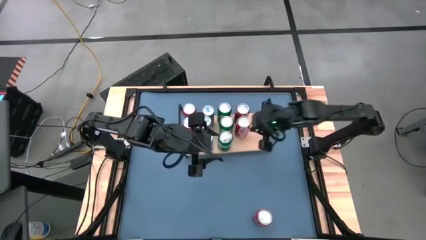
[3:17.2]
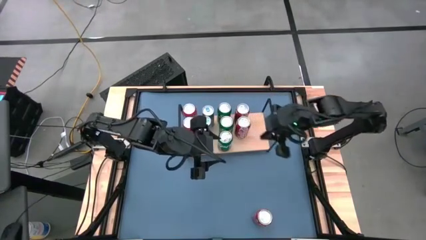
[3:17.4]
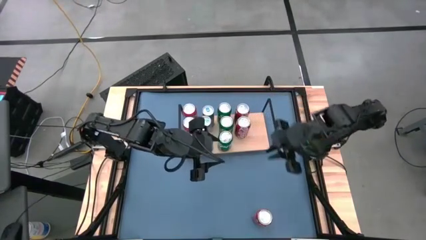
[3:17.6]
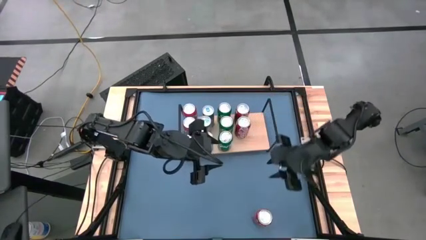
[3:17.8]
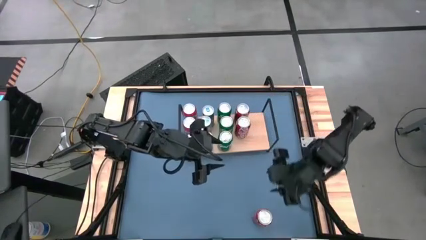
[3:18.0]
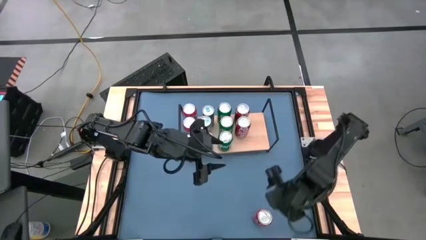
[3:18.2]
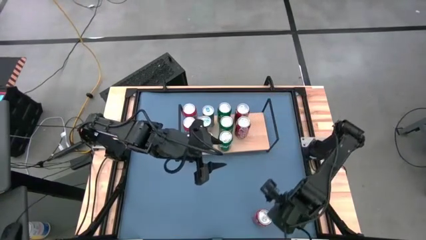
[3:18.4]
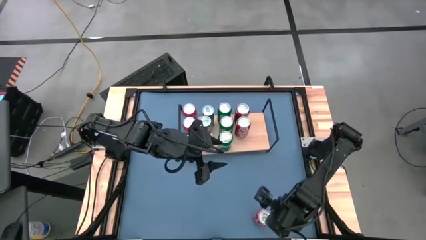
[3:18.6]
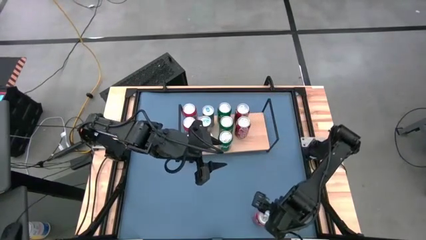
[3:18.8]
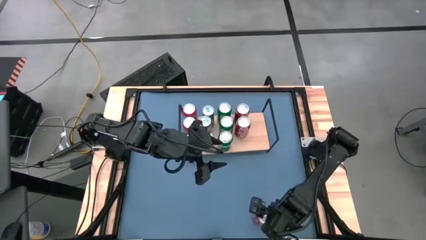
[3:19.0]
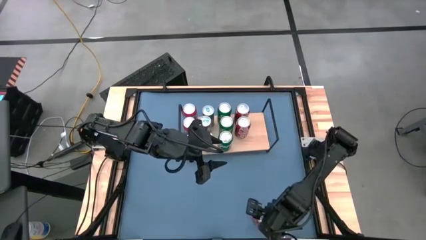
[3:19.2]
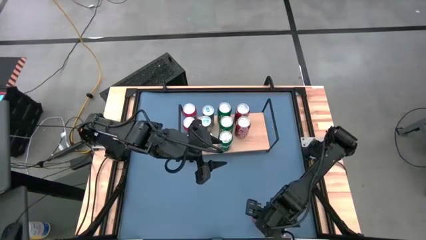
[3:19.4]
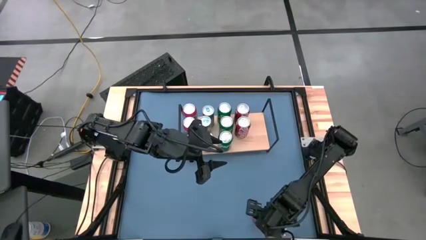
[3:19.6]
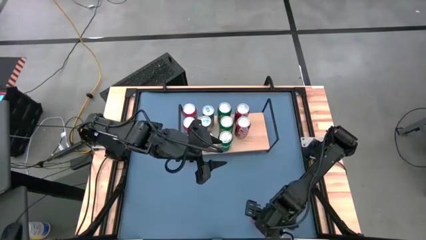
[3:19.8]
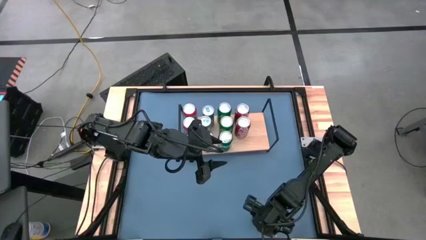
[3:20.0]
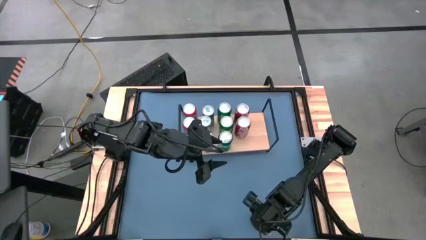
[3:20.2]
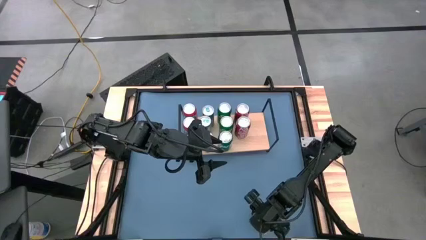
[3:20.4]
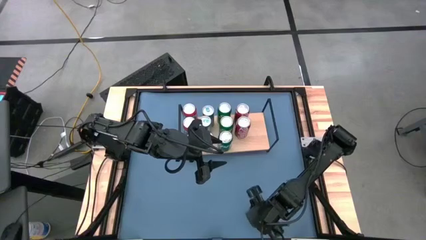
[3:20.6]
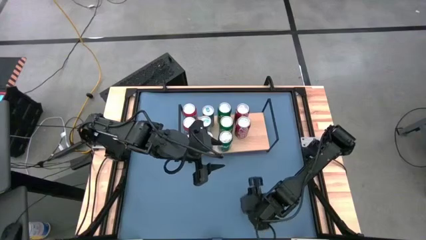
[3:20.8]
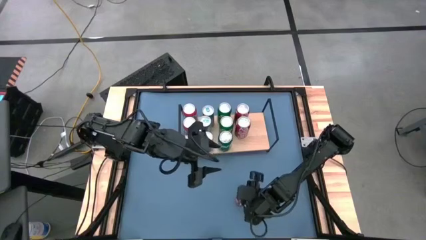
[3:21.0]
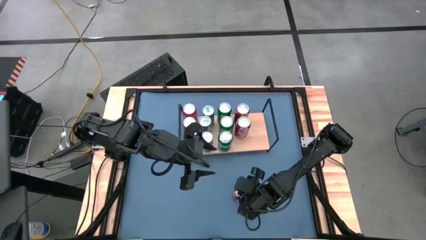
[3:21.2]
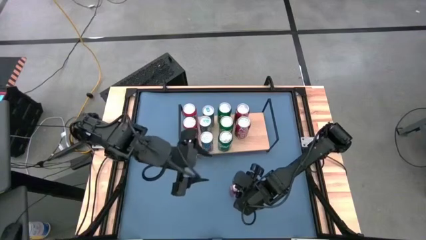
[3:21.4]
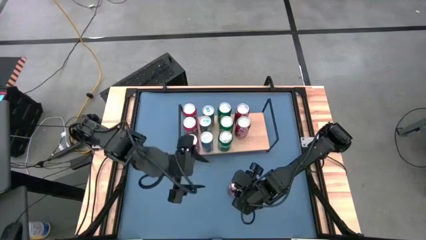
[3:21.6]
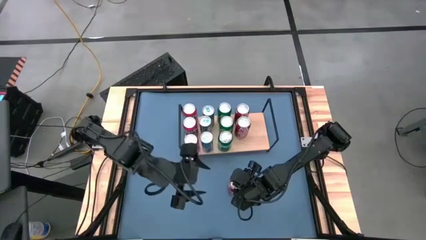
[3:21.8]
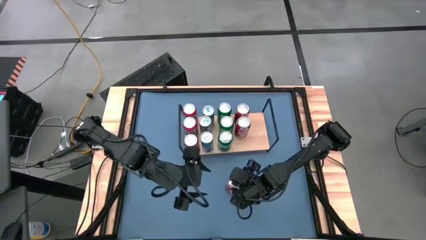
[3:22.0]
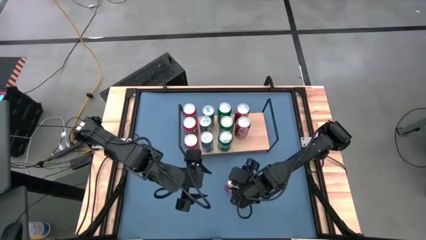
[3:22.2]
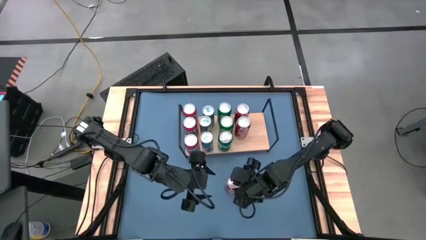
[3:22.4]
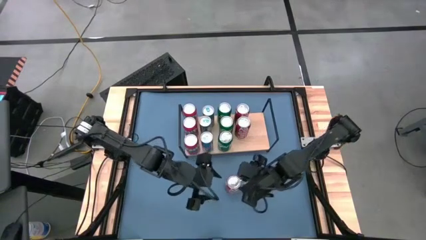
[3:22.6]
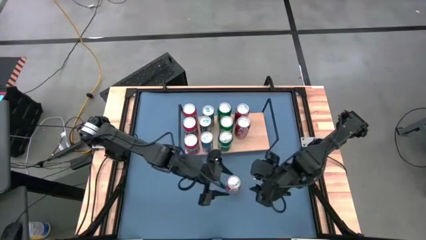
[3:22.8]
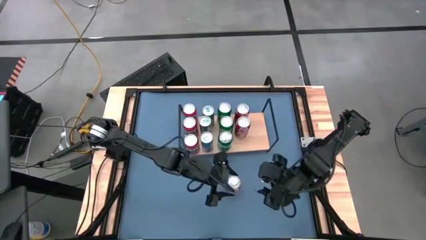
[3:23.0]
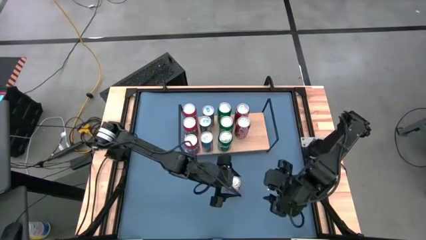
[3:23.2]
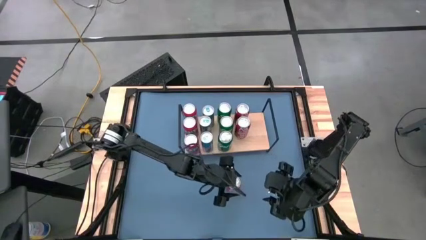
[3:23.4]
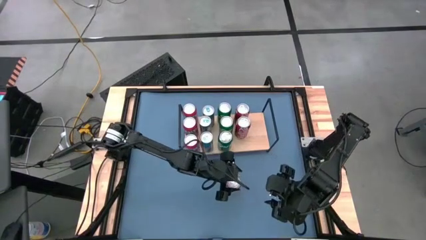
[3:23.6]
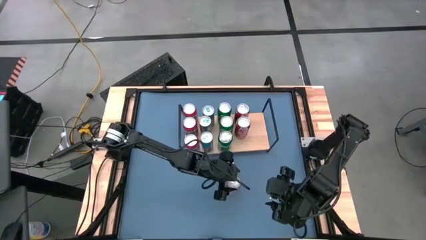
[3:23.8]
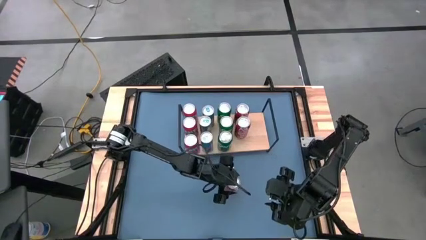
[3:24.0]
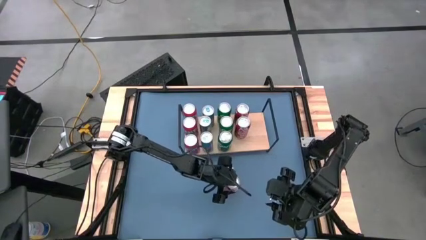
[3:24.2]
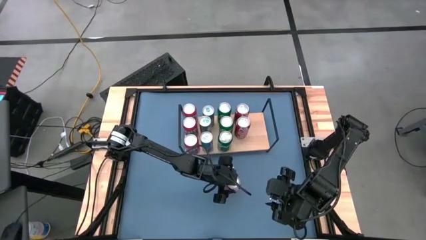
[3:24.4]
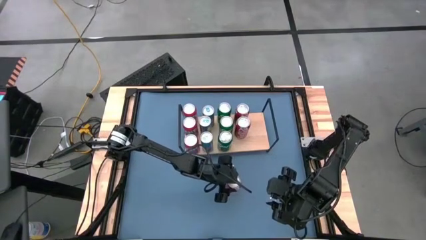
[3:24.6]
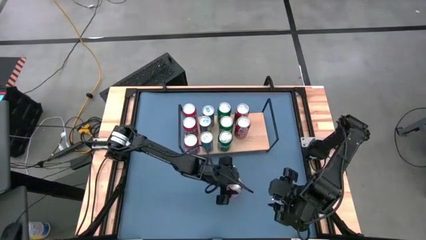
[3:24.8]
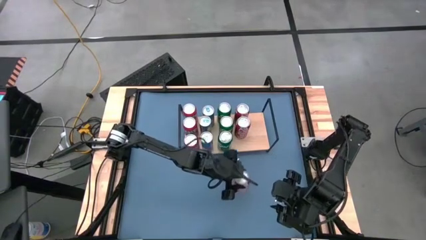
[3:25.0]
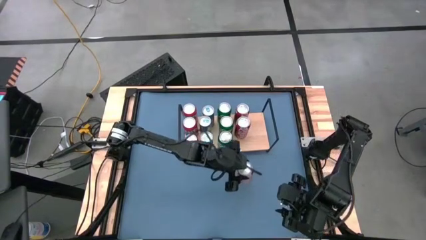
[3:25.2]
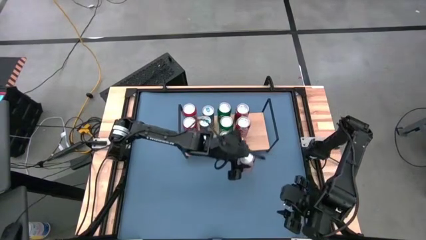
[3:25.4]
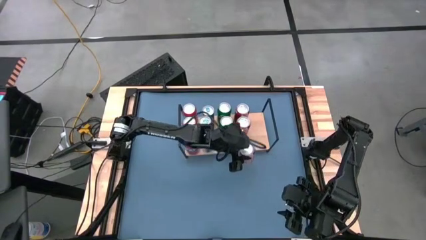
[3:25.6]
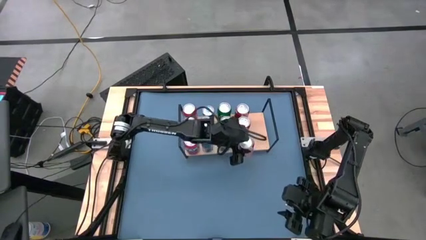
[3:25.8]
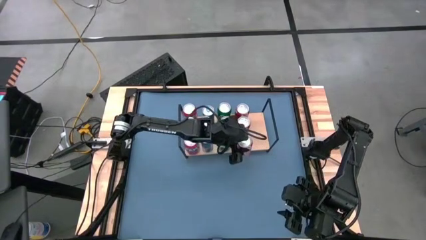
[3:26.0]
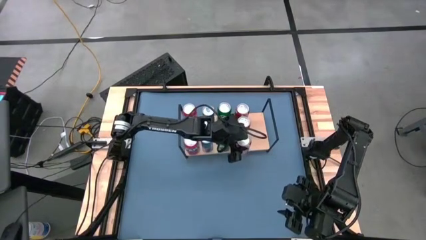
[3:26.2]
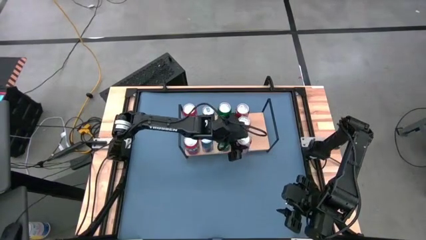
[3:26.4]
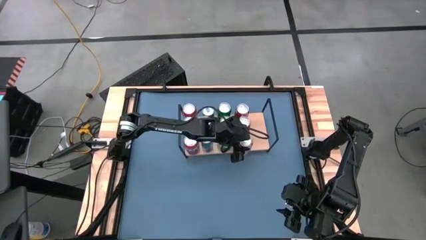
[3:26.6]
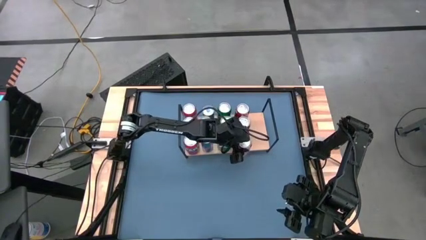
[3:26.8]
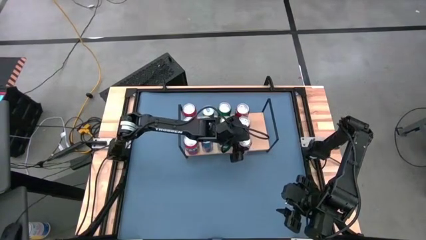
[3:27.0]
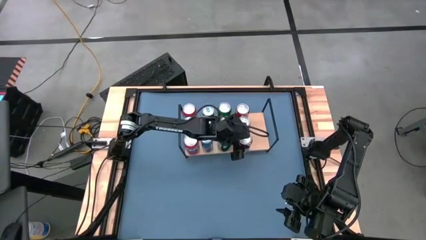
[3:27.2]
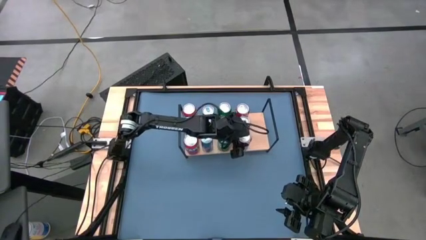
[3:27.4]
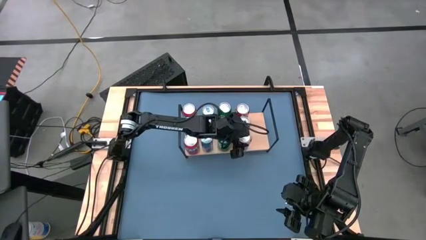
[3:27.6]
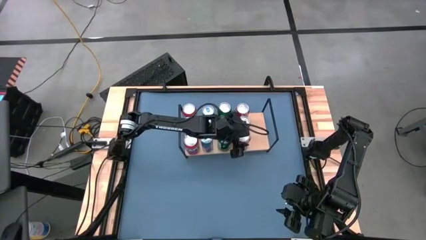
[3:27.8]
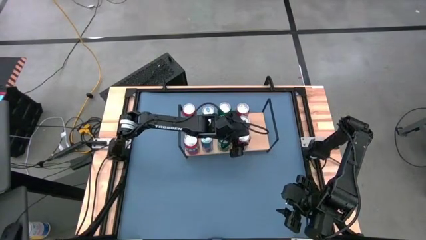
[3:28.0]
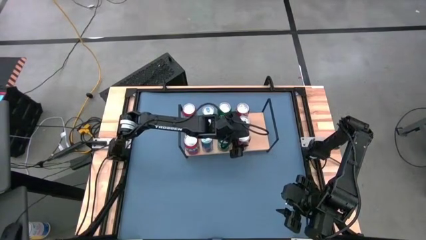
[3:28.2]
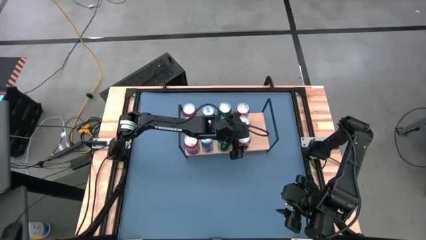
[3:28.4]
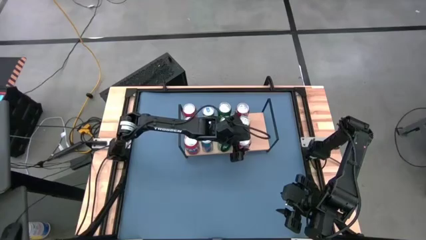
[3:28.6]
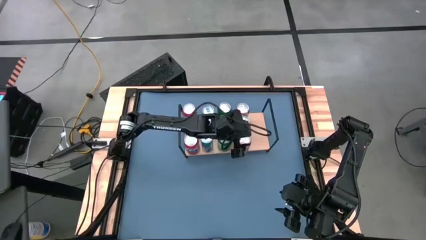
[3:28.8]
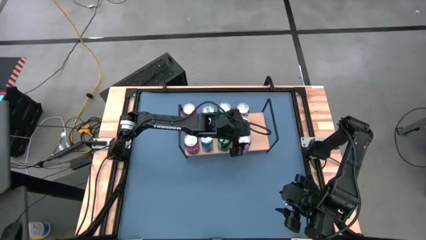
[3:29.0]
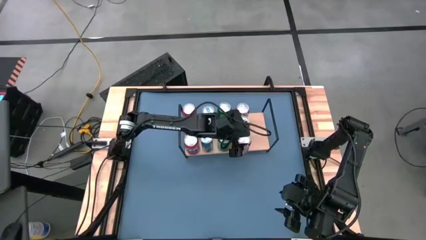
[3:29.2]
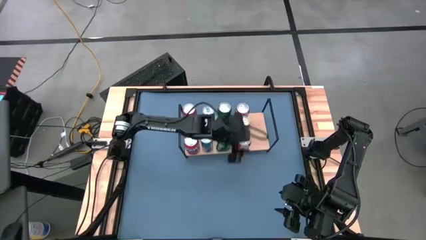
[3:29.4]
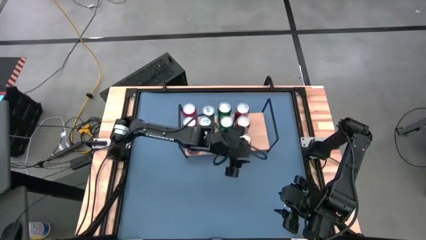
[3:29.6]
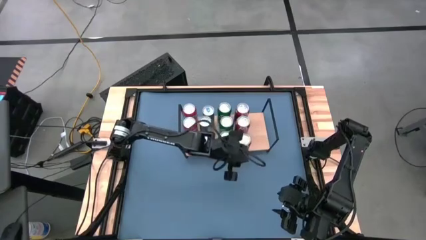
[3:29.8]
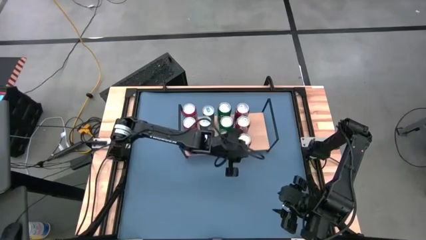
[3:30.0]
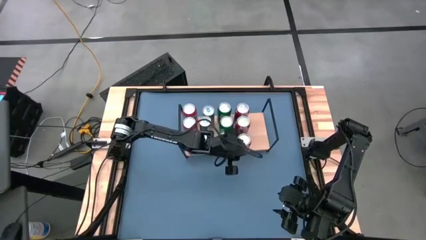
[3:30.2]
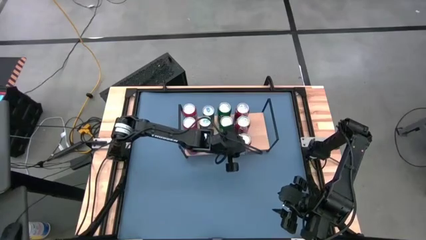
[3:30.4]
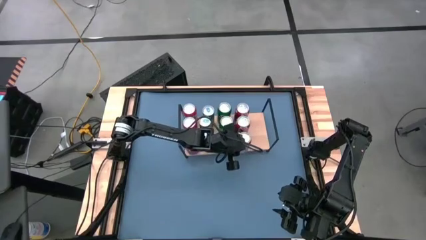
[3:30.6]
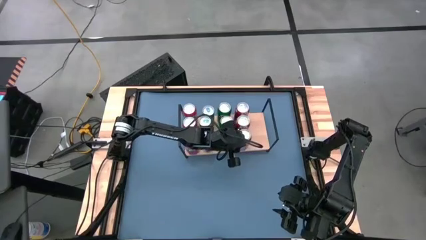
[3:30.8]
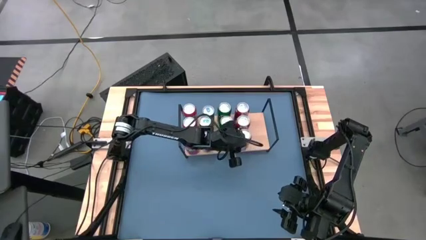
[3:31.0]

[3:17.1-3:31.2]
Task: Place canned beverage on shelf
Put the red soda can on the shelf aligned with other red soda cans
